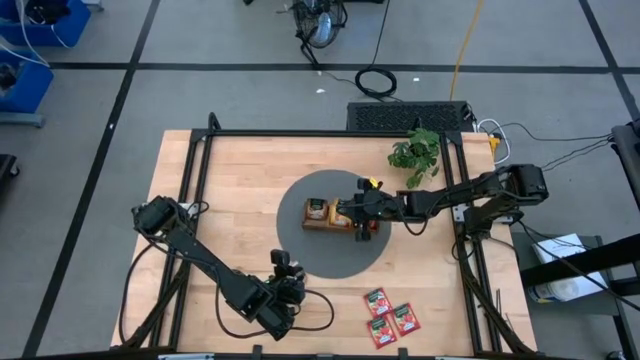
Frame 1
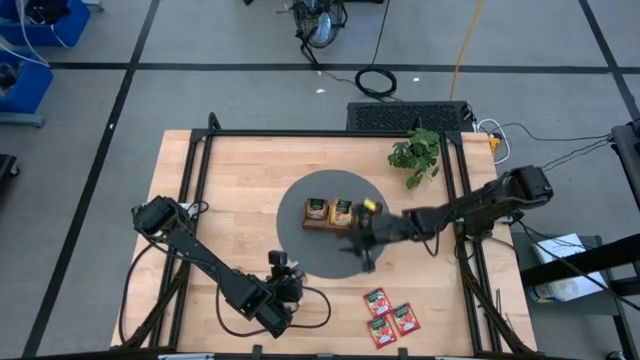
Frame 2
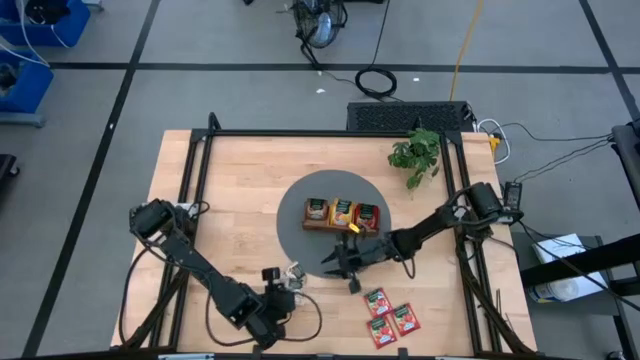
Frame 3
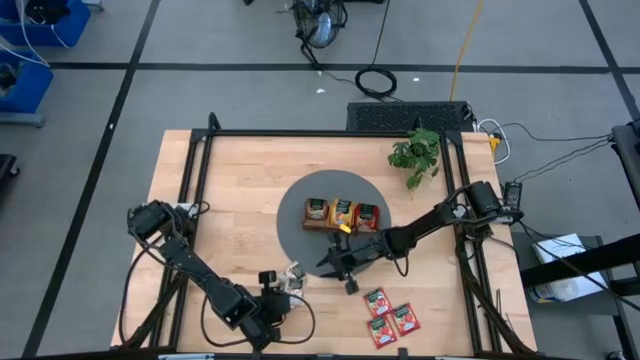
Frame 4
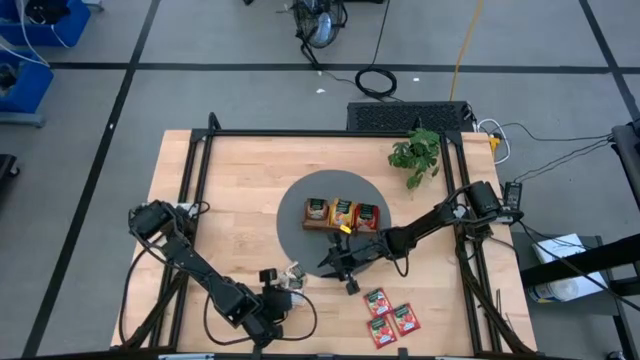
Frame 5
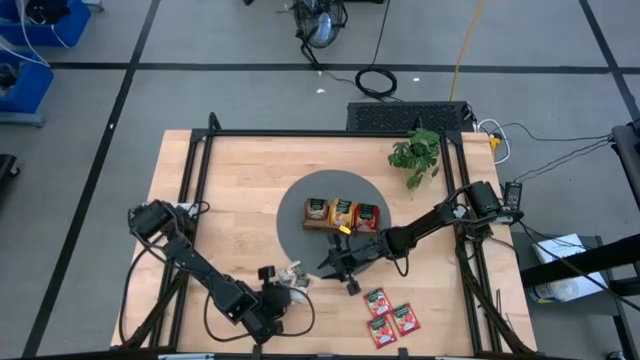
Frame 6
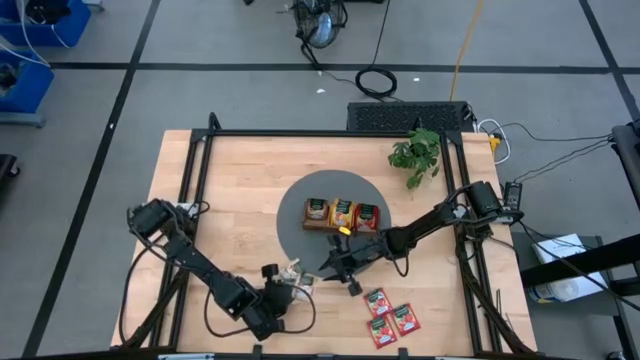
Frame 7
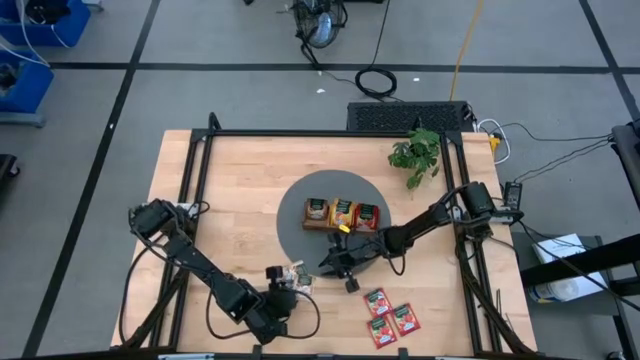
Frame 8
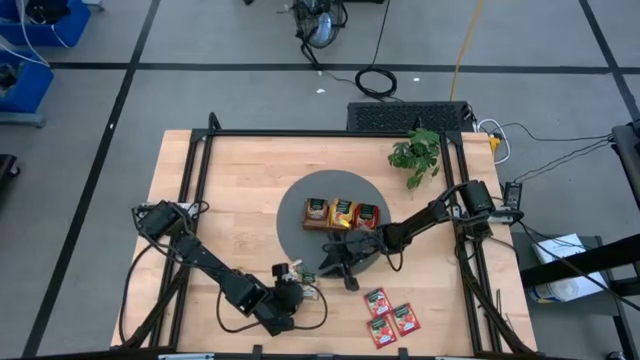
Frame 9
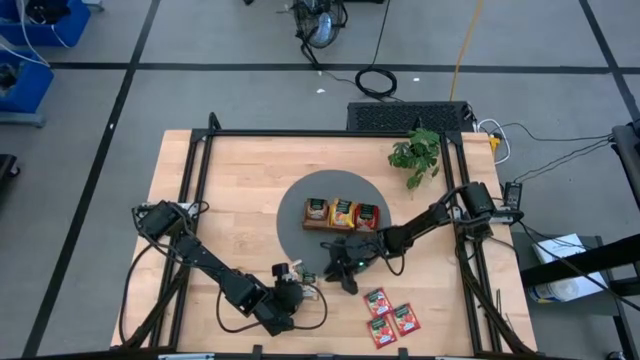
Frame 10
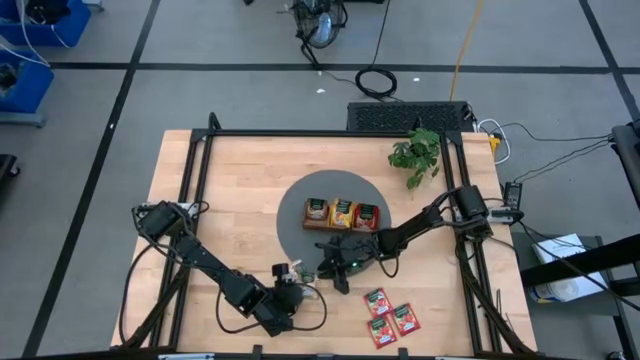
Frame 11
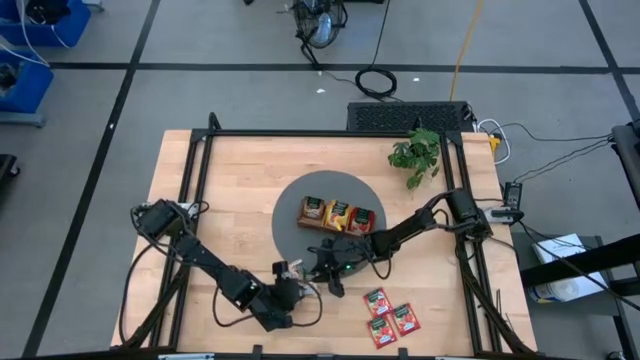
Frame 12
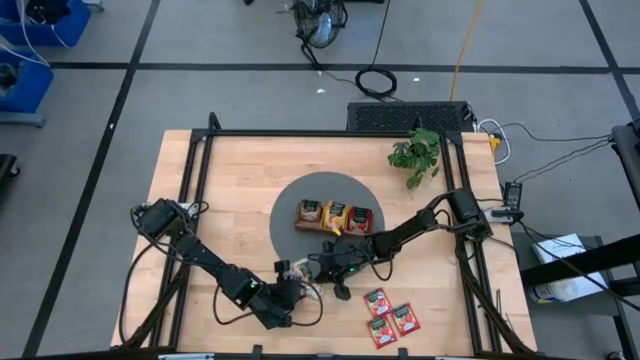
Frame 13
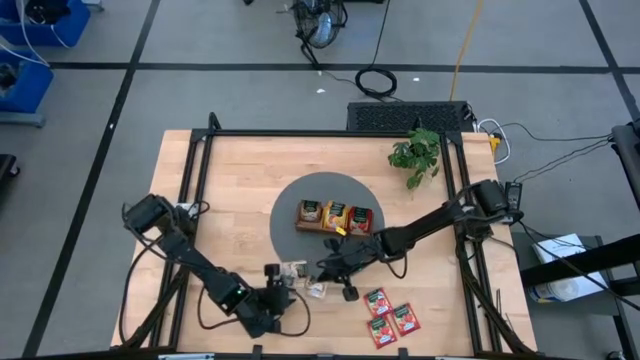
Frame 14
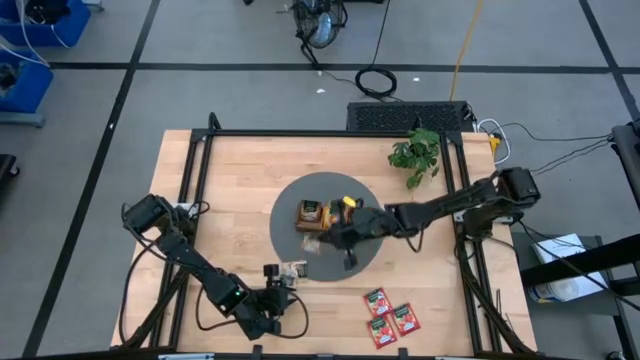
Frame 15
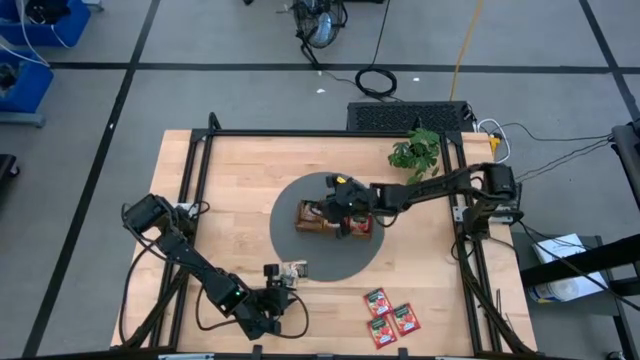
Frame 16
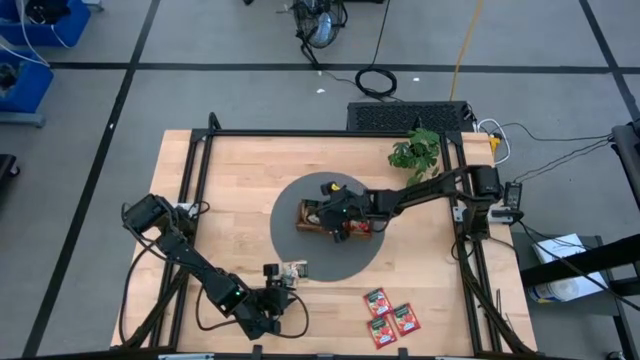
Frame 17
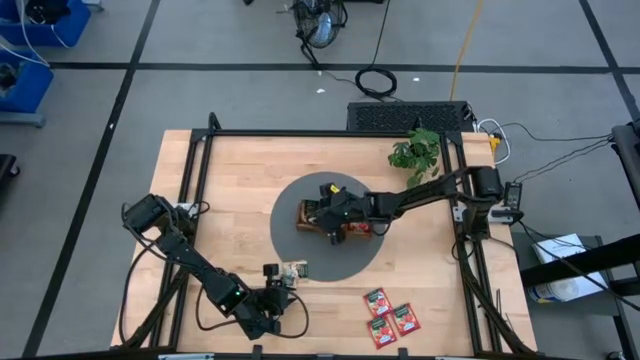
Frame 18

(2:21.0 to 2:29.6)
Task: Pick & Place Tea
Put the gold tea bag into the left compartment of the wooden organizer

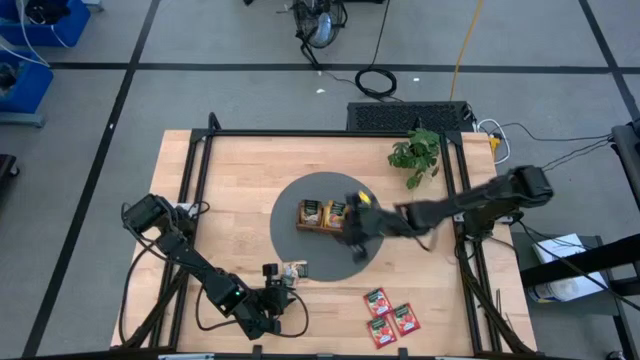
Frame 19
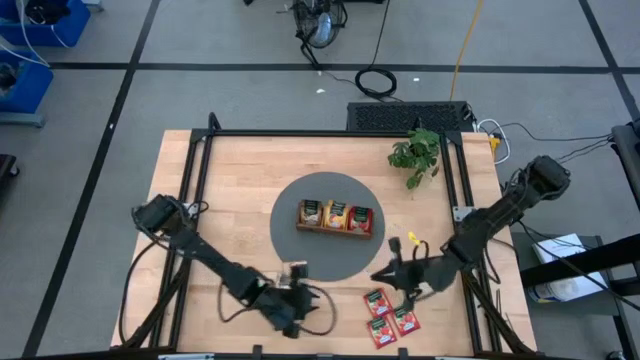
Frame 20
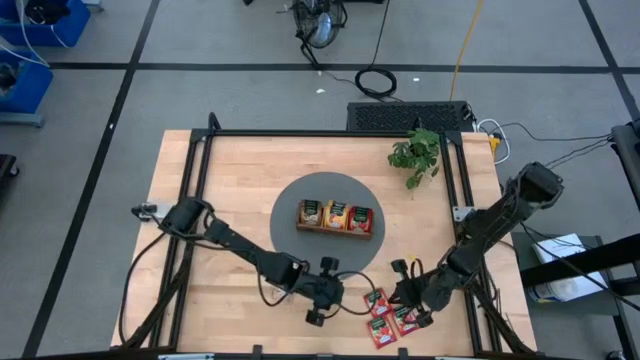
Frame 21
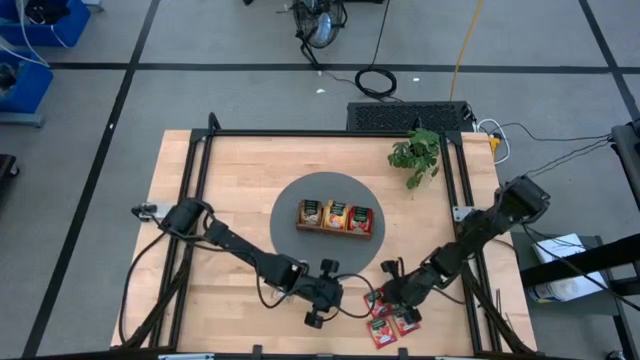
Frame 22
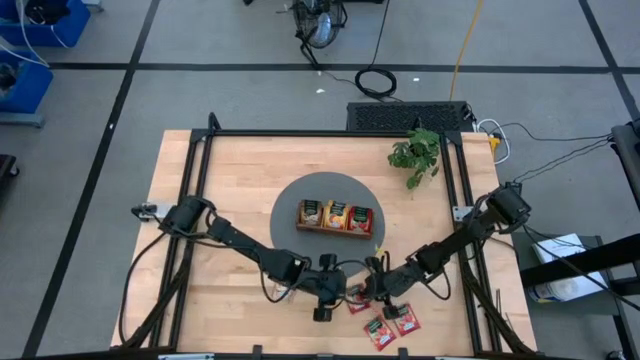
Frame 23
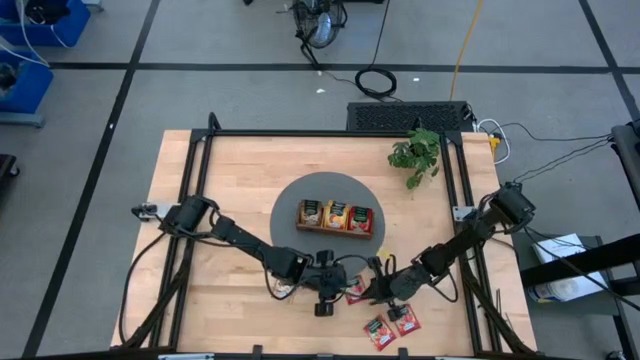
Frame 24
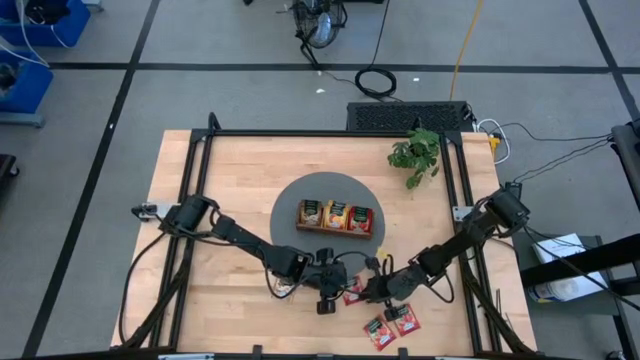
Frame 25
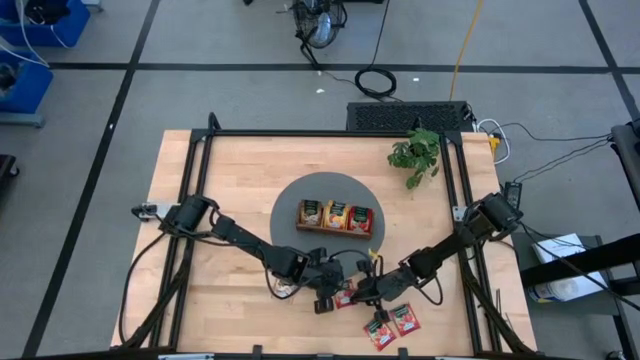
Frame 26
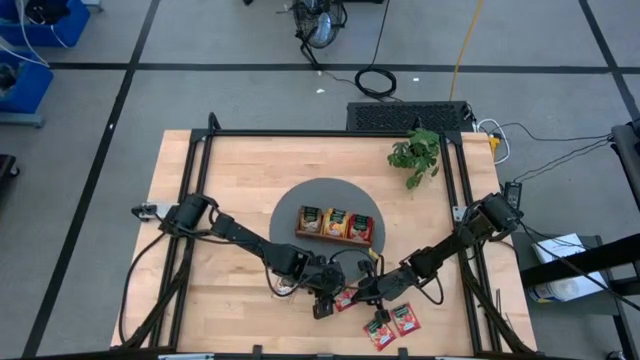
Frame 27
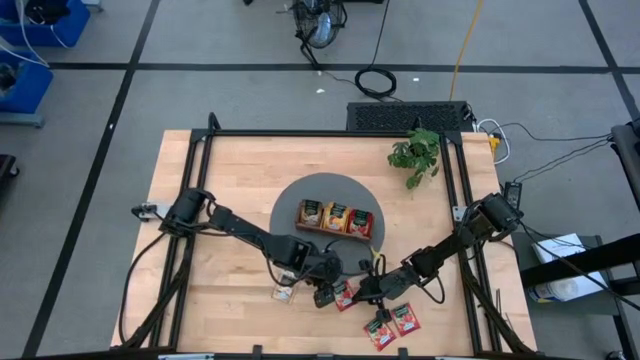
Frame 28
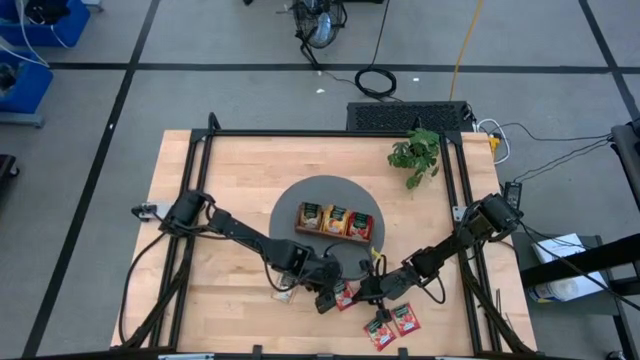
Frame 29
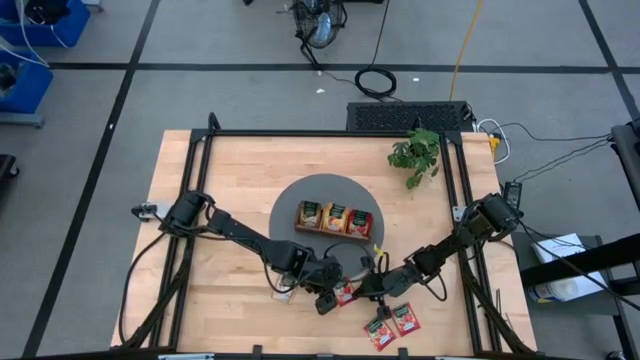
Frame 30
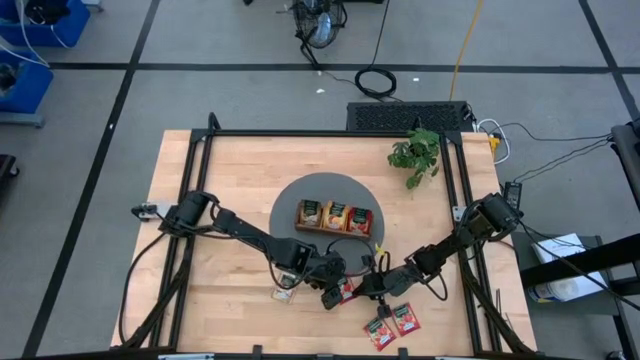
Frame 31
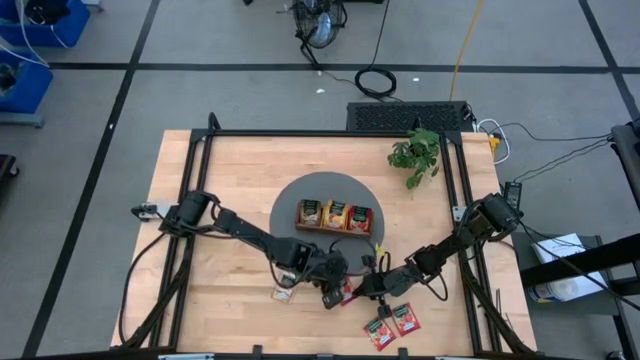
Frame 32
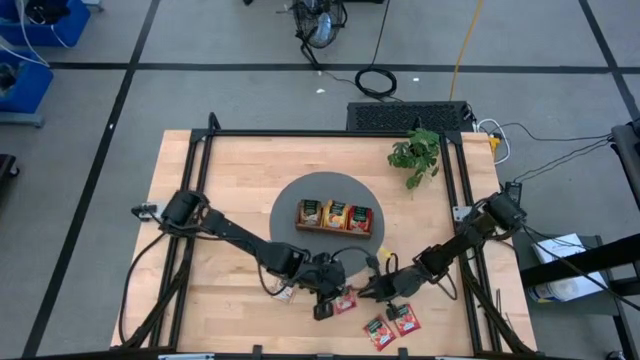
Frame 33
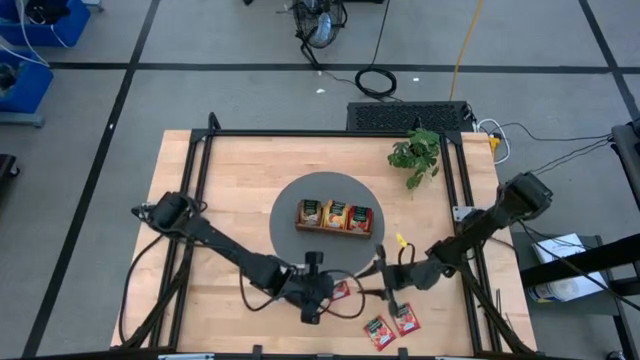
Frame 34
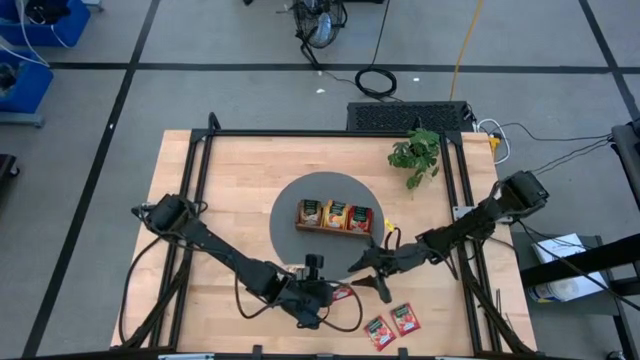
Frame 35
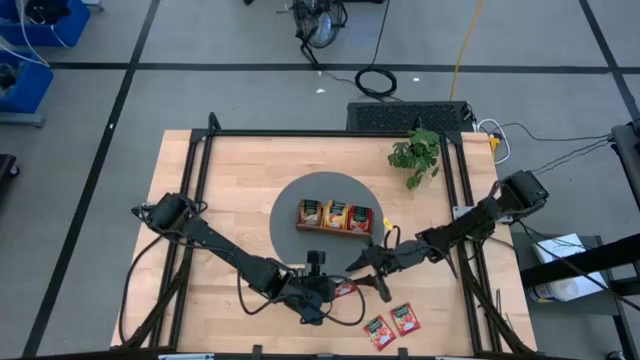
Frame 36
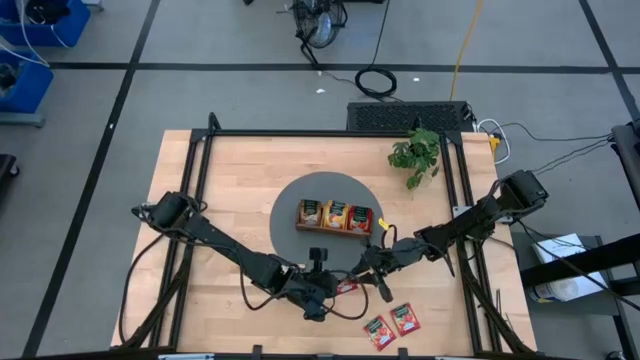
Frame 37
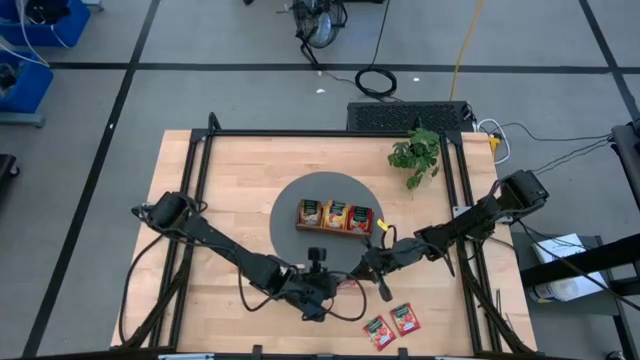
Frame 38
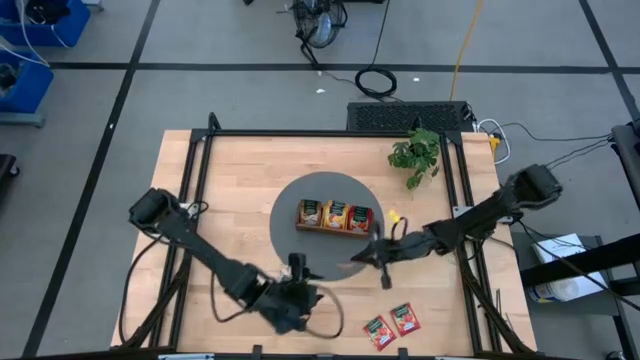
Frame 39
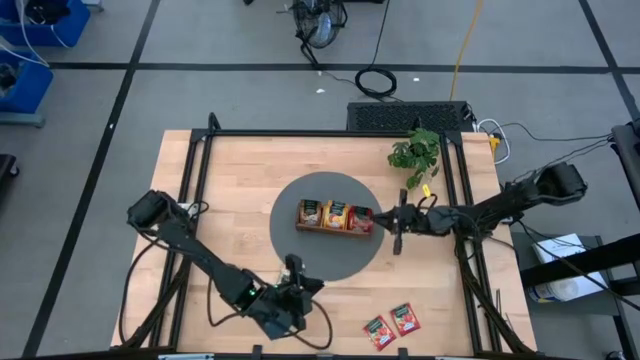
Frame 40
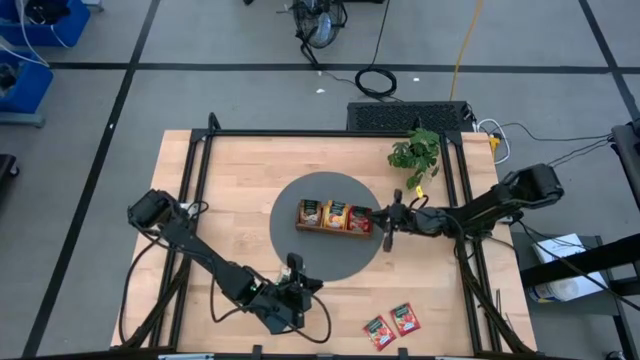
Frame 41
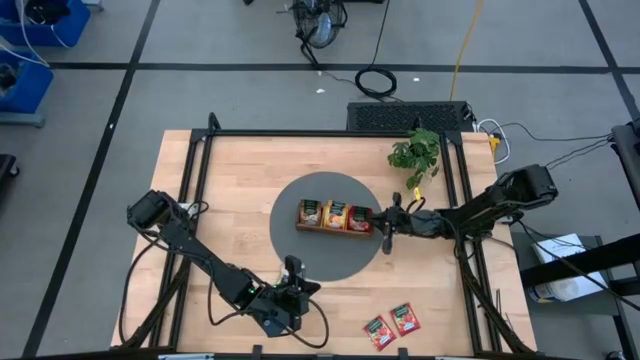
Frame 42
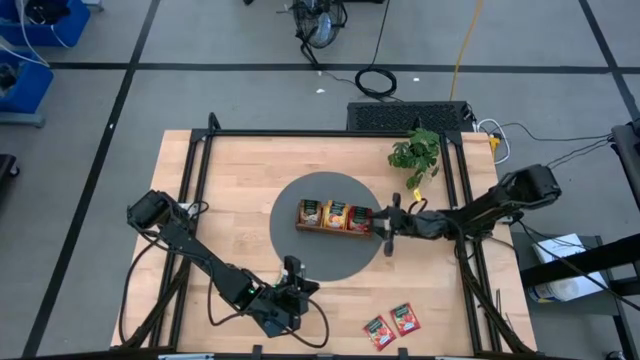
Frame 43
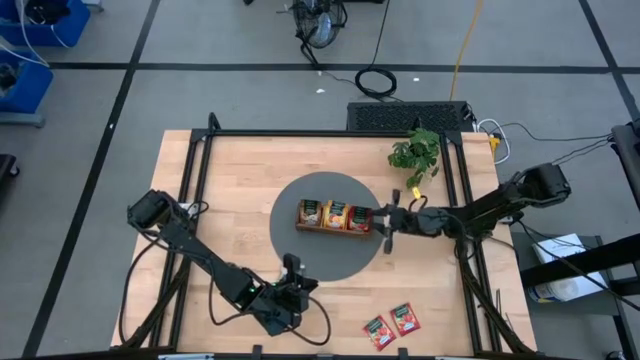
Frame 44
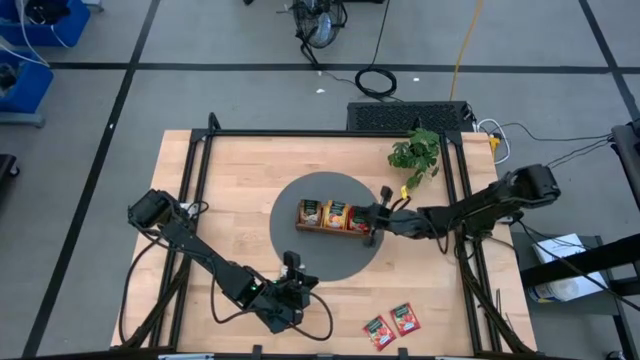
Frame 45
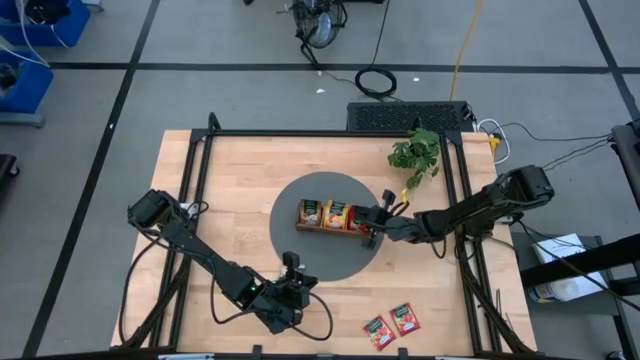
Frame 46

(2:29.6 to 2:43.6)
Put the red tea bag into the right compartment of the wooden organizer
